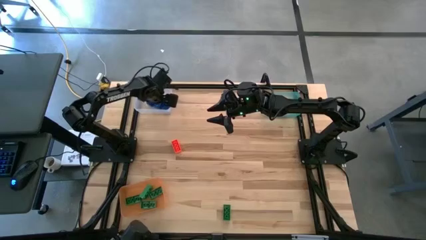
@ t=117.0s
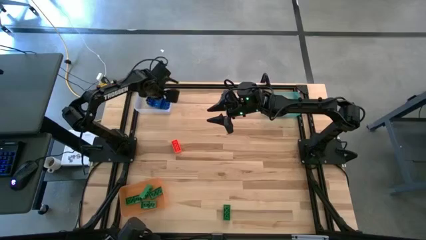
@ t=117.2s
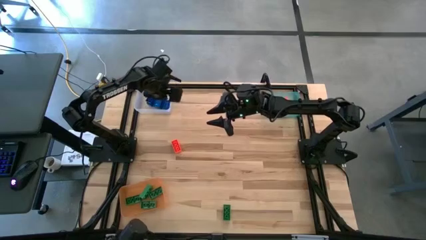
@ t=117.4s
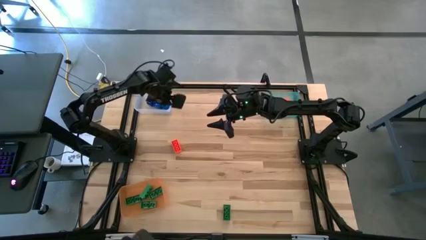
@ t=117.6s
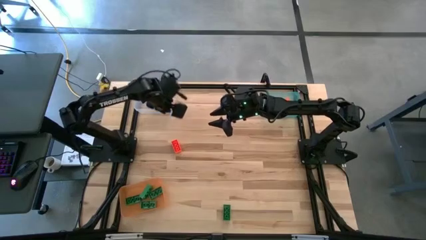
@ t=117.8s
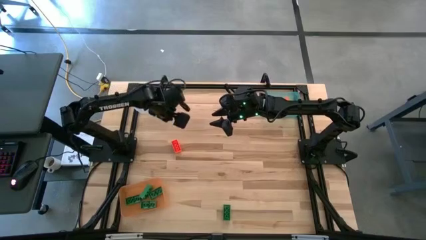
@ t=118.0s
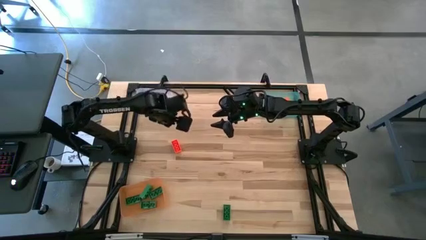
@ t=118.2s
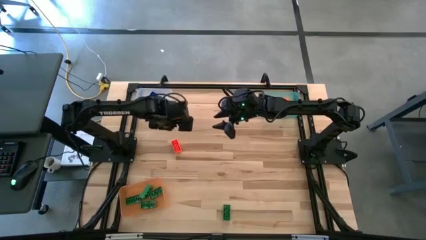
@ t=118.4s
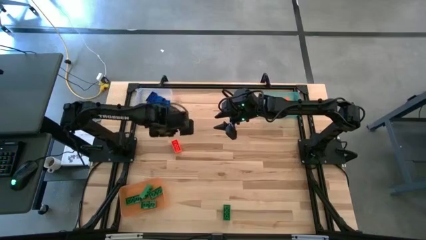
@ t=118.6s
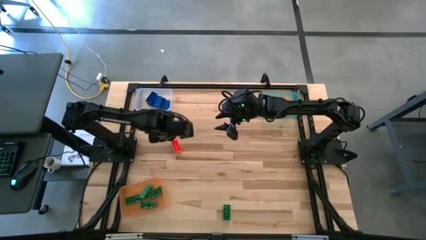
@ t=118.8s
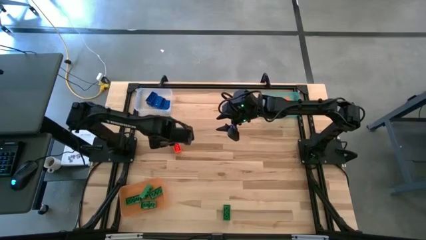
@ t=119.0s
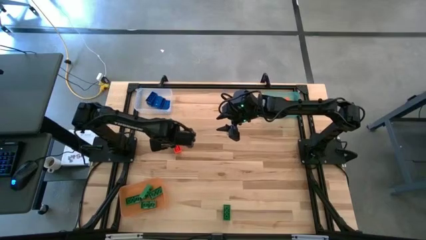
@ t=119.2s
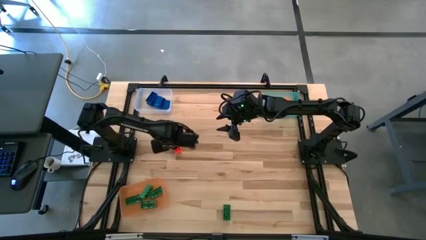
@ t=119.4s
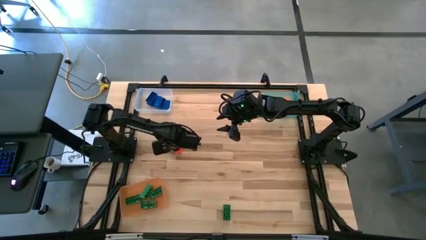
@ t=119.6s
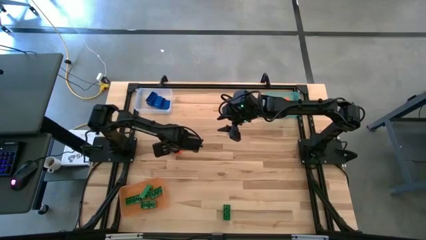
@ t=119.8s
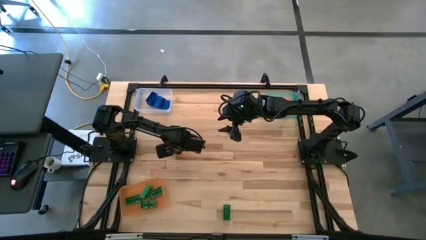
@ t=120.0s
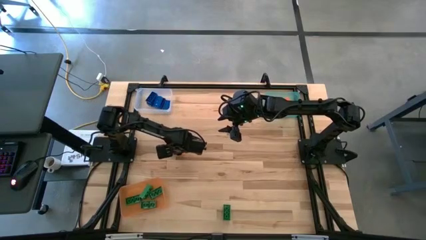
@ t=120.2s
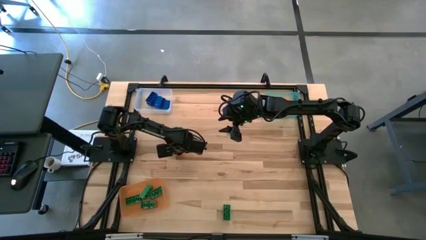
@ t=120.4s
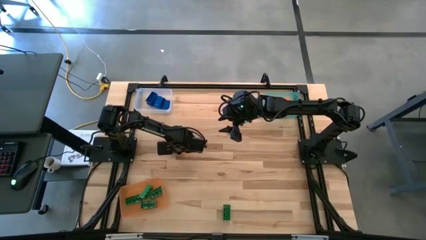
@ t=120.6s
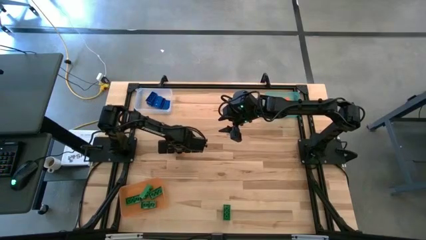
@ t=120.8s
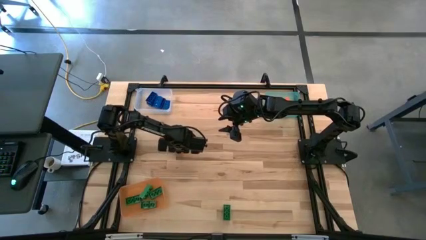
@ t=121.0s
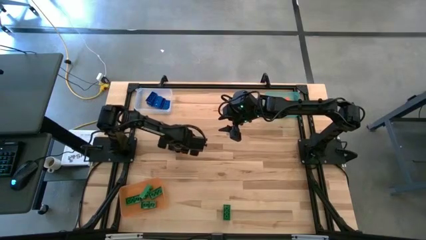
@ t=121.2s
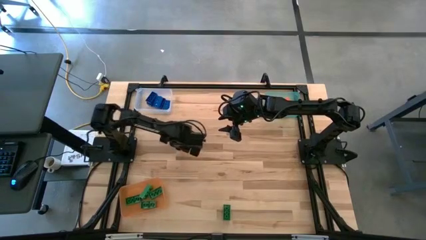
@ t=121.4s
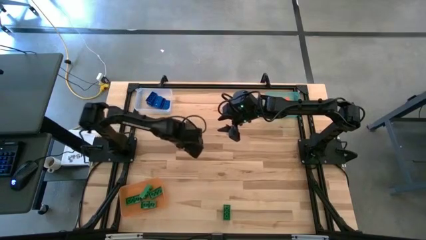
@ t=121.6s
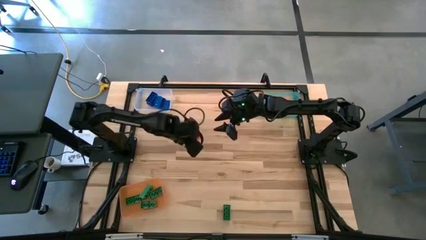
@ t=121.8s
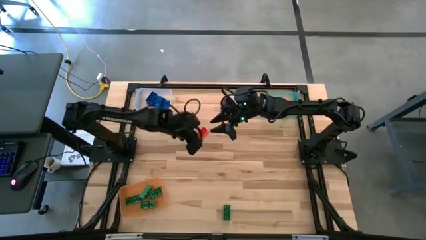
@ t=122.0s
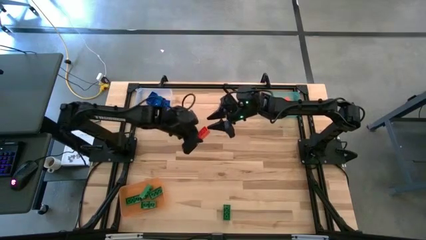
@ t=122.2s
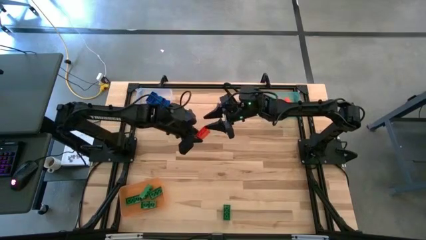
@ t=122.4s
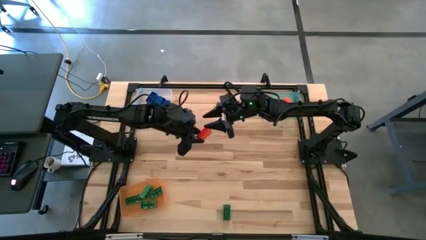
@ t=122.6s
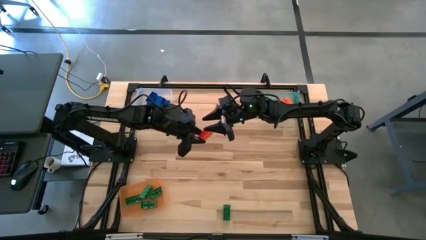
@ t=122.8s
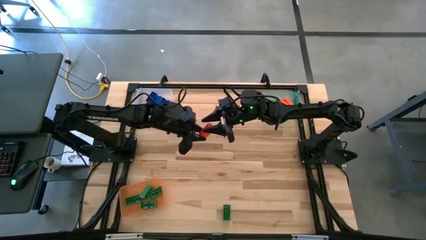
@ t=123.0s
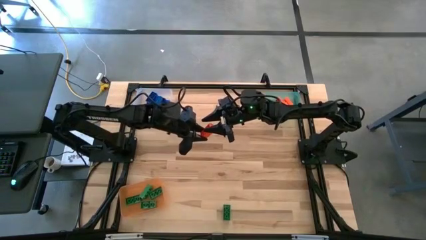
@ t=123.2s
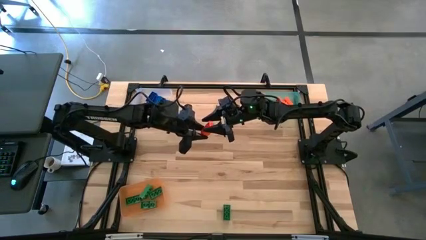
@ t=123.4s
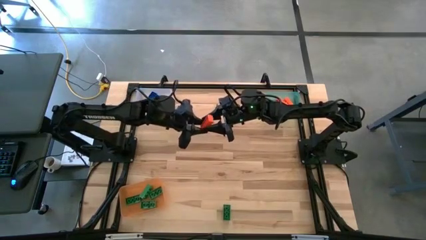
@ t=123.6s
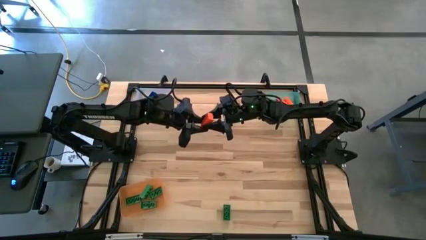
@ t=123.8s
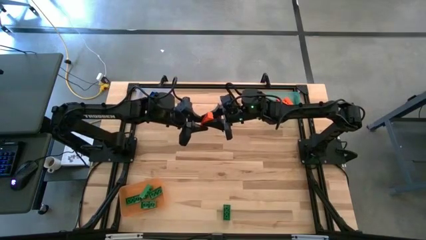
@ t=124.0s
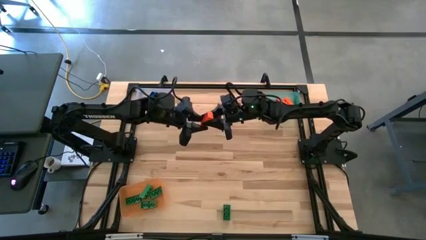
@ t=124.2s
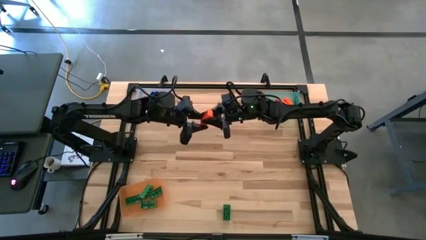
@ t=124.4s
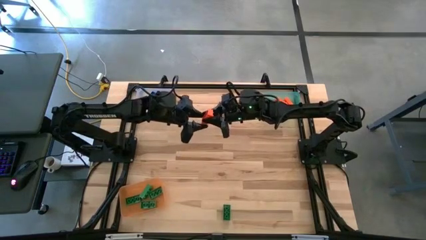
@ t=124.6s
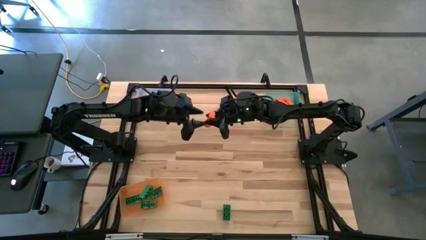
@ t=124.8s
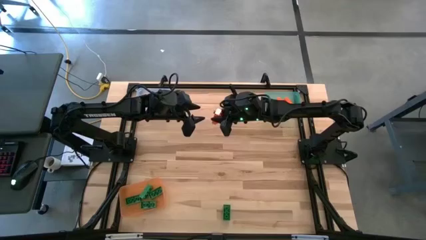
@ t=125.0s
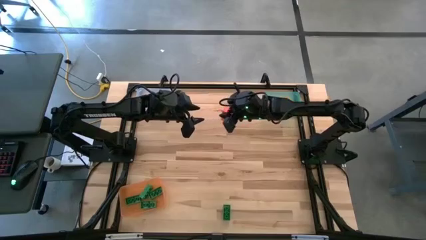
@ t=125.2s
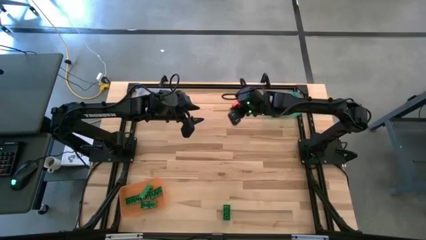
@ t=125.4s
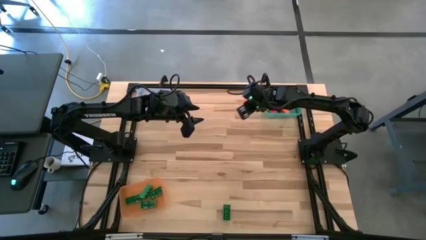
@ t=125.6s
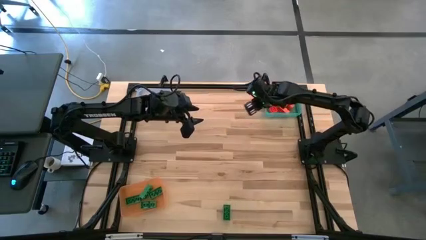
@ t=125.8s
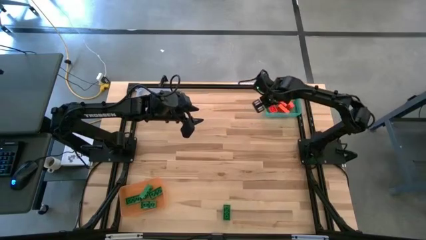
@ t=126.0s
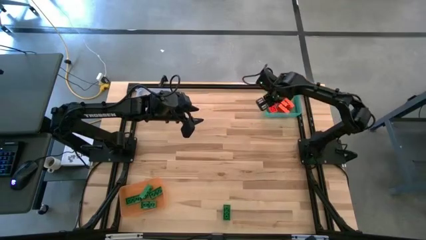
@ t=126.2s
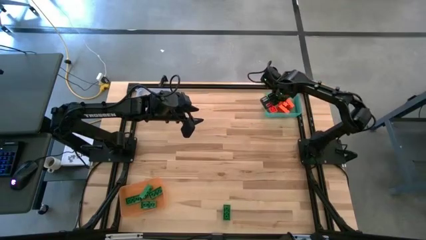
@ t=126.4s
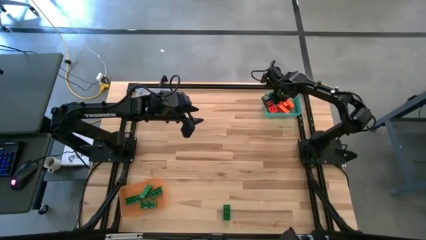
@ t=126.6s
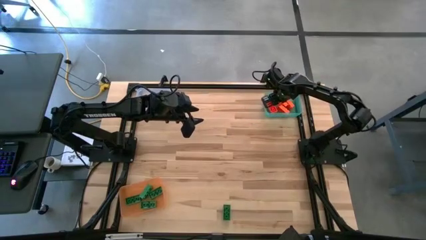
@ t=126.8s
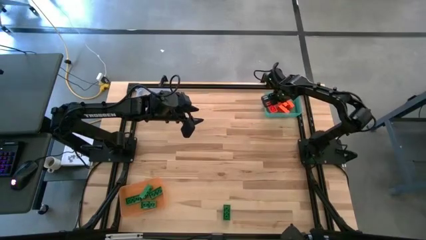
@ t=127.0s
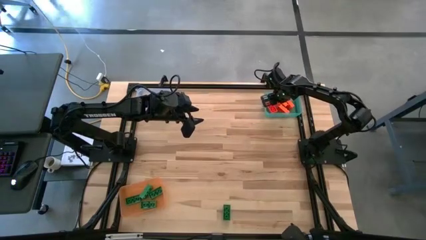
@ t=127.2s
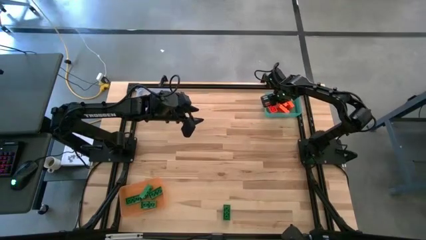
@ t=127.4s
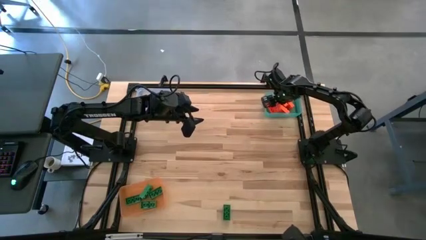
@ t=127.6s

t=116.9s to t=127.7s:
Task: Sort & place blocks by color
Put the orange game piece into the light blue bin

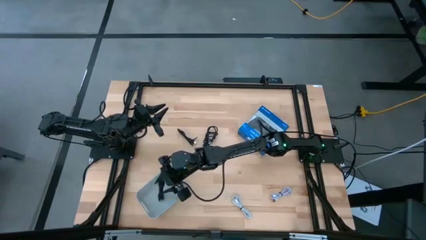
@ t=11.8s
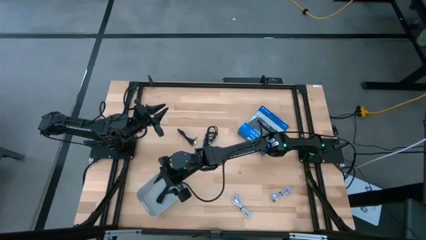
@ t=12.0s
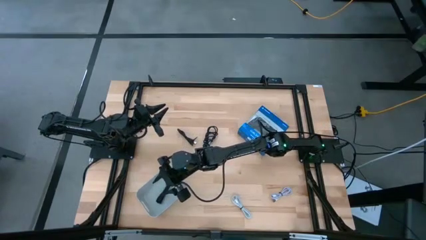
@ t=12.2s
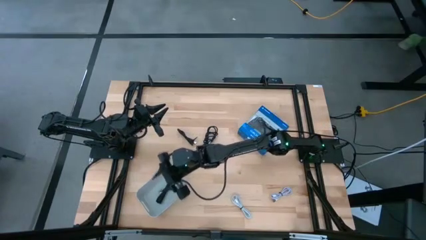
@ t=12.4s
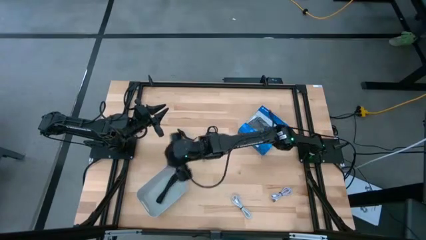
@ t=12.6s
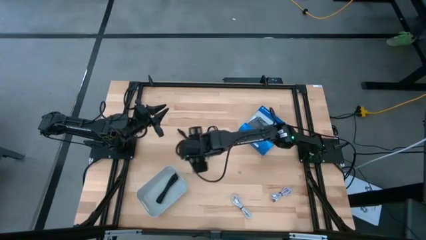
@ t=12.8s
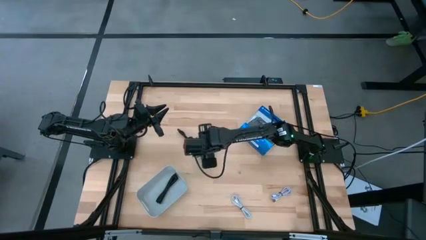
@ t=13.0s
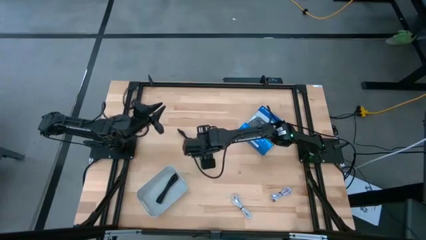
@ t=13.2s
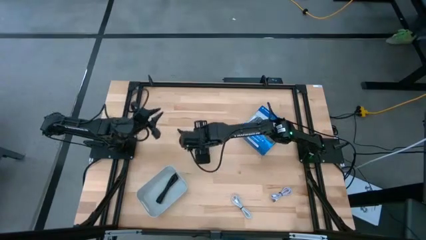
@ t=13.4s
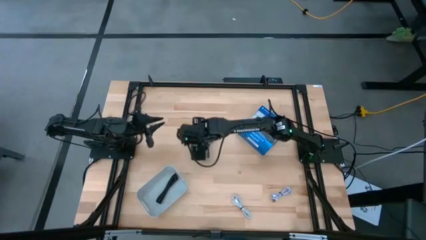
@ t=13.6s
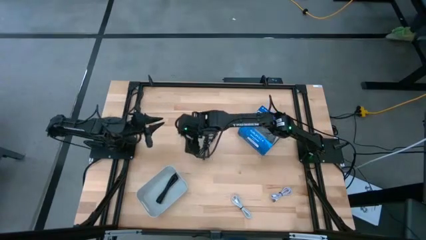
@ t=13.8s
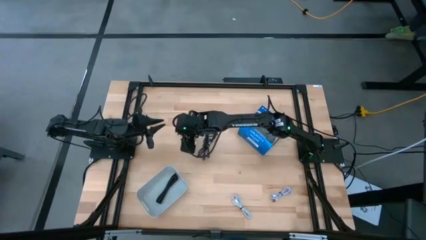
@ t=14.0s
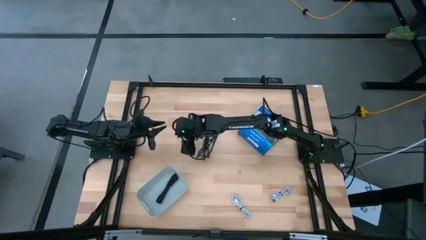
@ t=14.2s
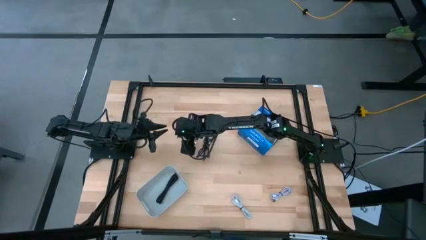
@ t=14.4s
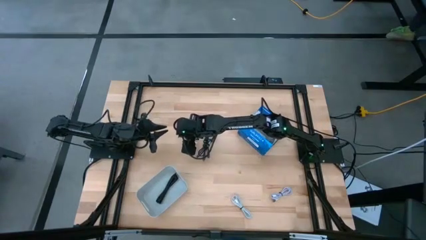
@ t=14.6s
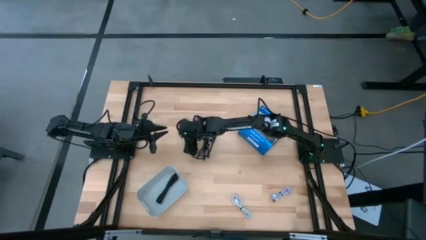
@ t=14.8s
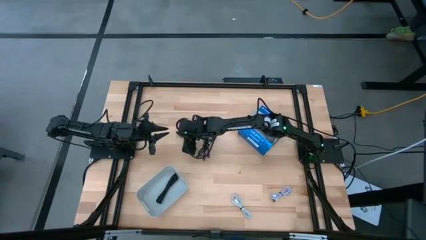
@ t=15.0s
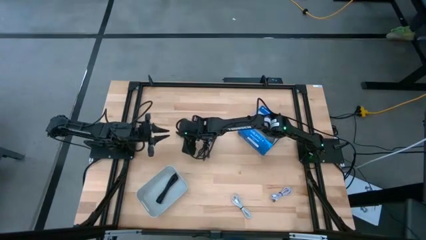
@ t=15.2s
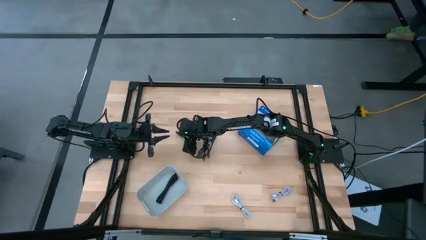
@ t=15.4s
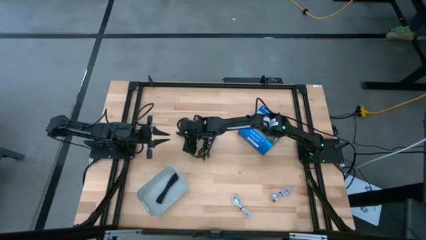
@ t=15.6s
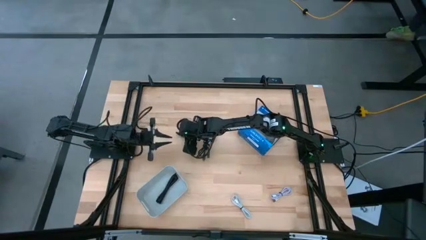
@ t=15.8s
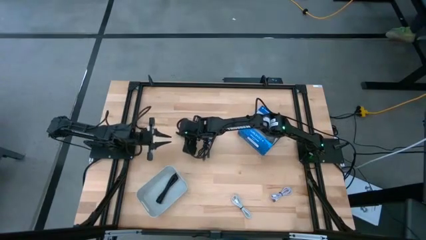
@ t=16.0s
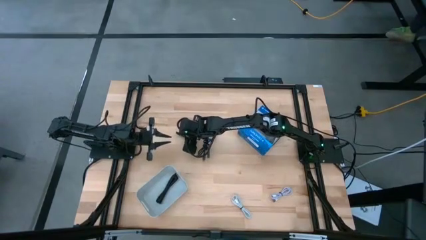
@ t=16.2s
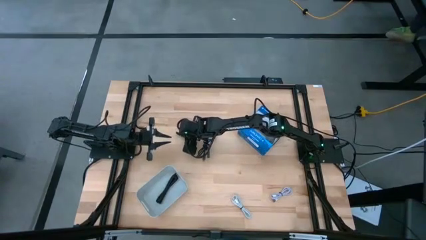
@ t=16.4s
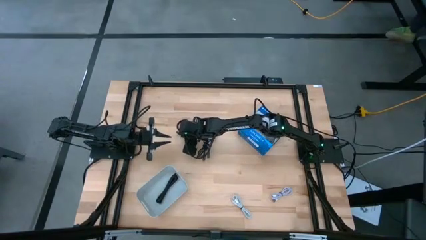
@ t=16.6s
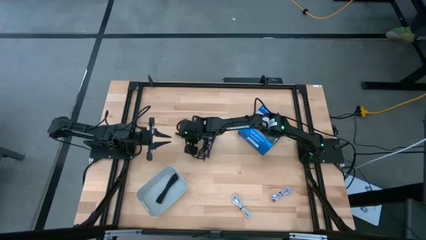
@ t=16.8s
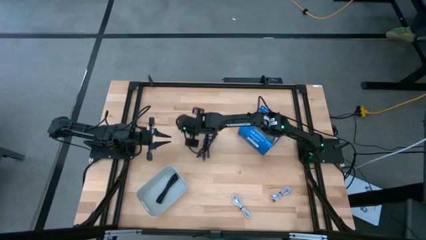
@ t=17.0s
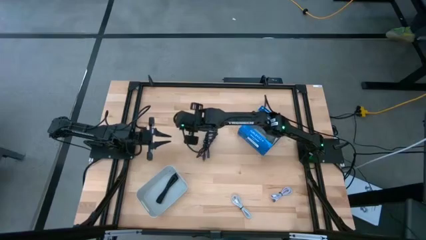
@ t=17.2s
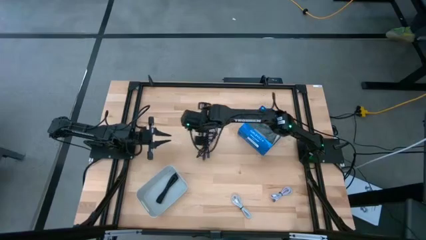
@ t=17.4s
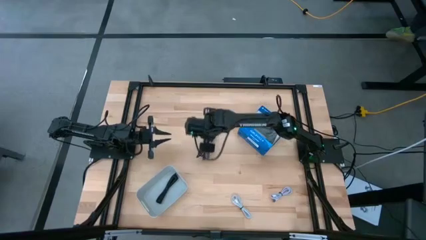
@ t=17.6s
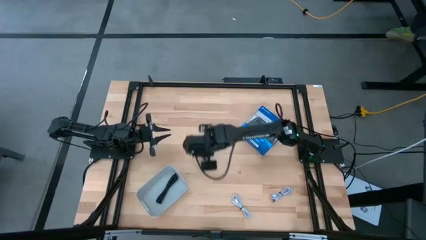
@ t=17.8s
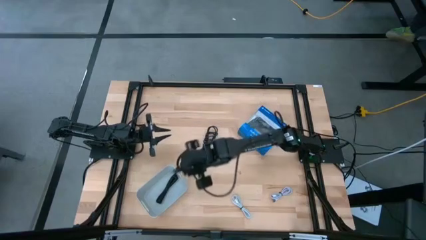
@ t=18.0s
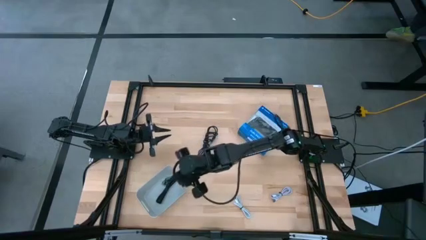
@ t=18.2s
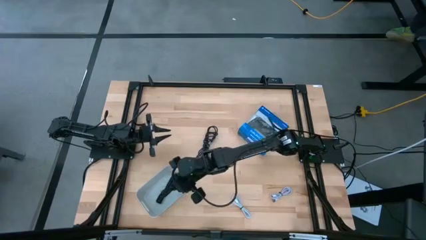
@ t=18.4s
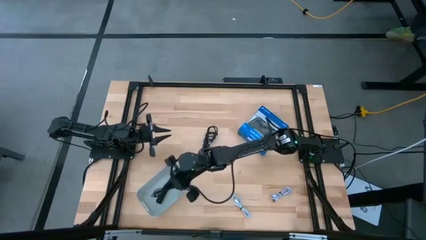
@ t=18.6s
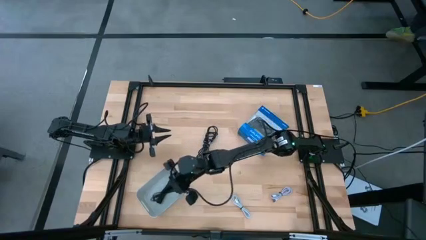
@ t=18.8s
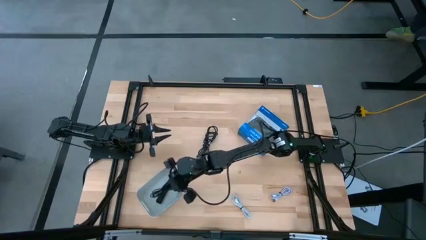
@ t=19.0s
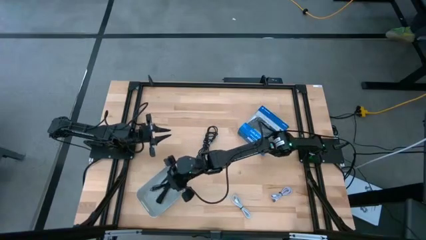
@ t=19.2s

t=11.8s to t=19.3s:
Task: Pick and place USB-C Cables
Put the left black charger cable into the white bin
